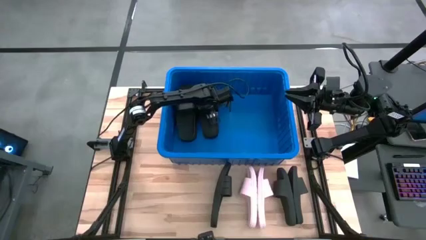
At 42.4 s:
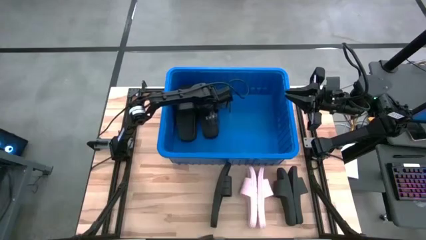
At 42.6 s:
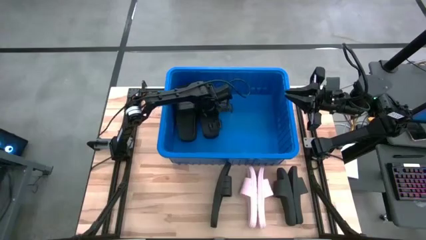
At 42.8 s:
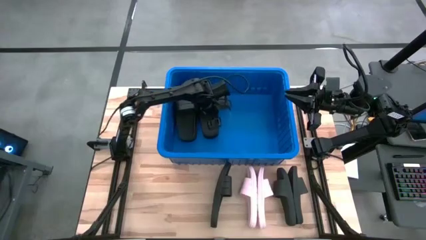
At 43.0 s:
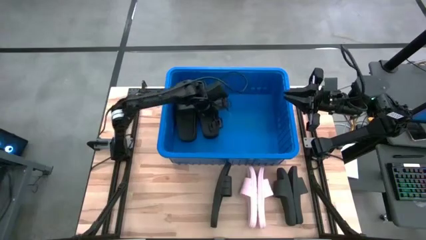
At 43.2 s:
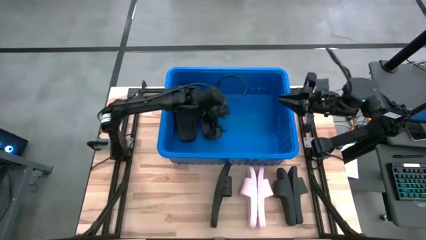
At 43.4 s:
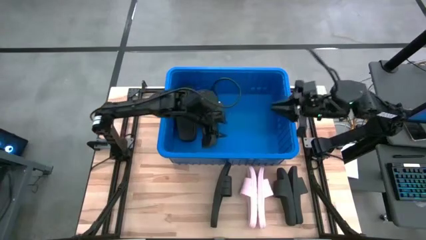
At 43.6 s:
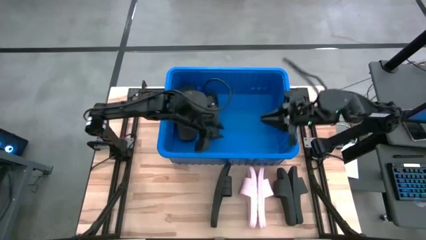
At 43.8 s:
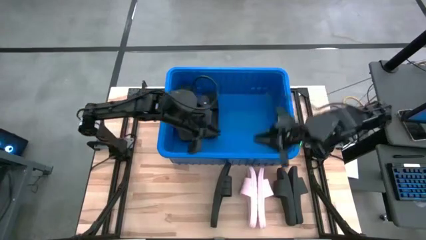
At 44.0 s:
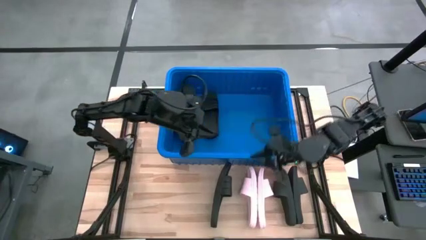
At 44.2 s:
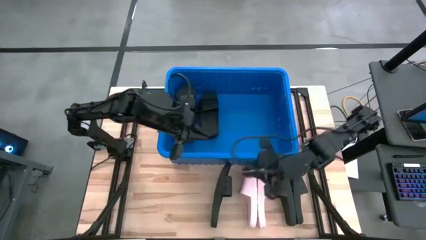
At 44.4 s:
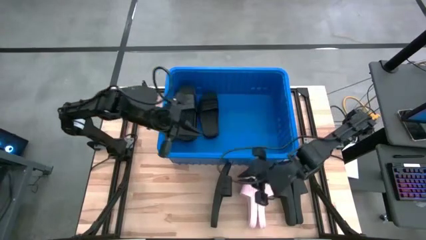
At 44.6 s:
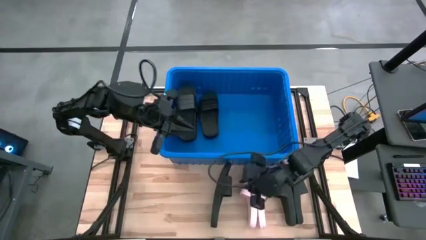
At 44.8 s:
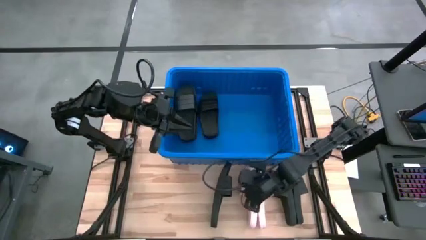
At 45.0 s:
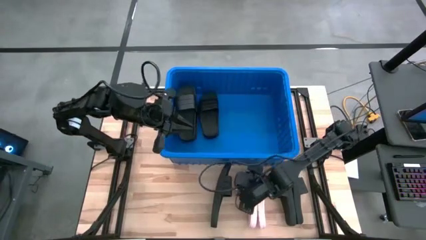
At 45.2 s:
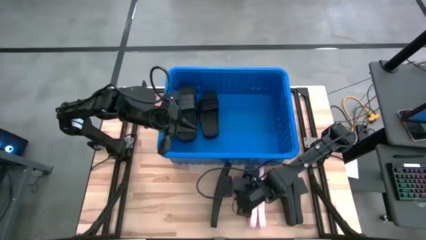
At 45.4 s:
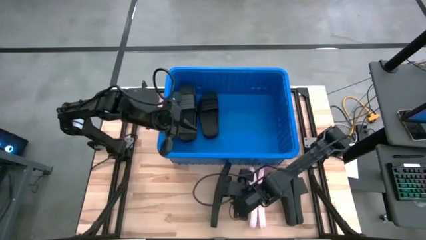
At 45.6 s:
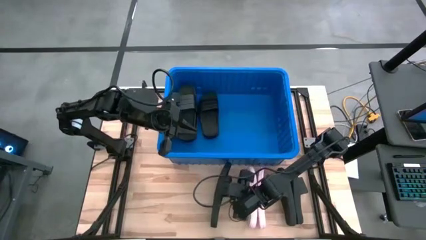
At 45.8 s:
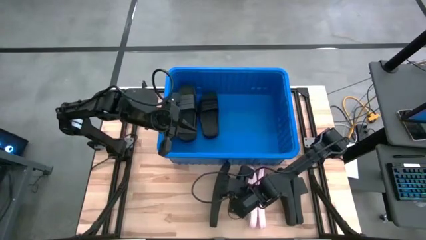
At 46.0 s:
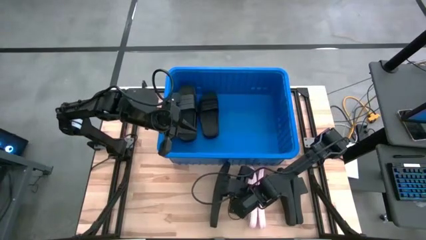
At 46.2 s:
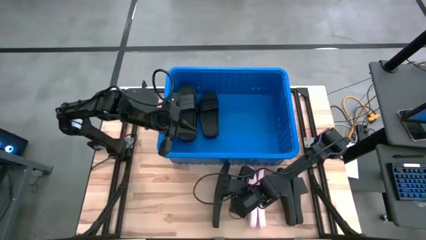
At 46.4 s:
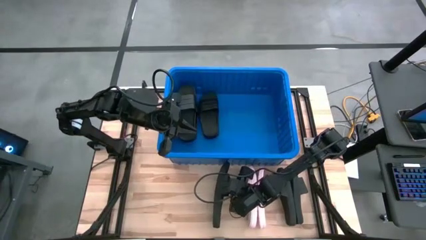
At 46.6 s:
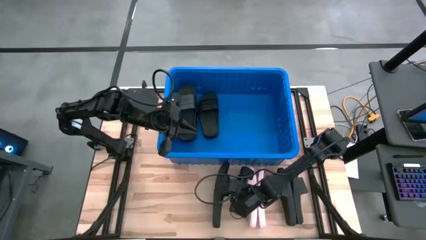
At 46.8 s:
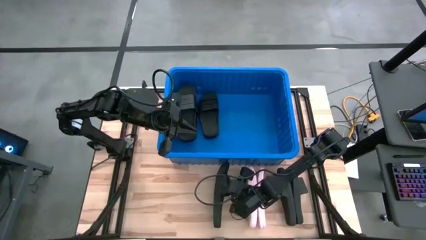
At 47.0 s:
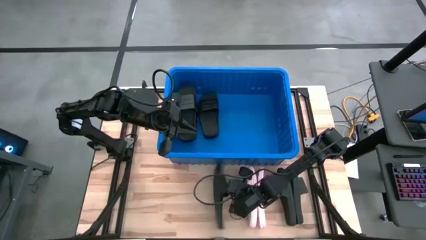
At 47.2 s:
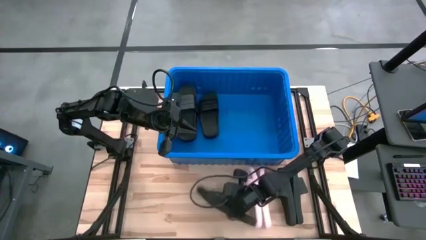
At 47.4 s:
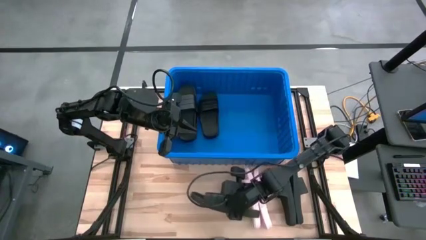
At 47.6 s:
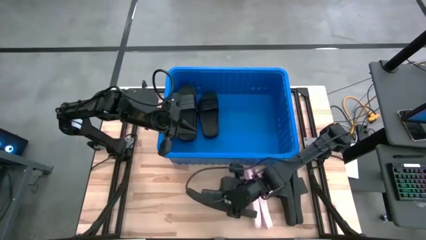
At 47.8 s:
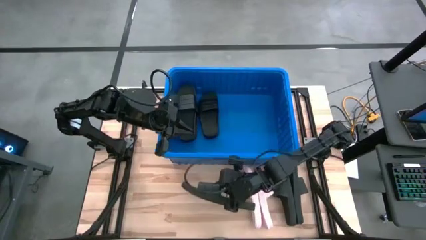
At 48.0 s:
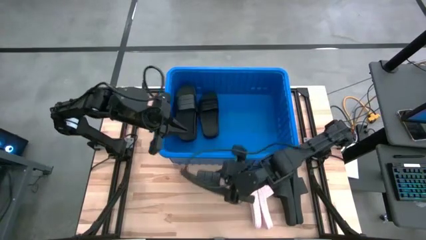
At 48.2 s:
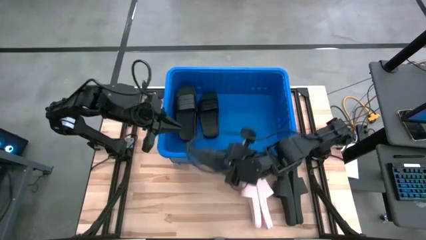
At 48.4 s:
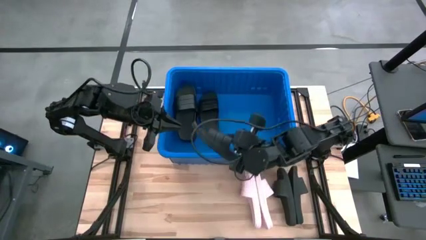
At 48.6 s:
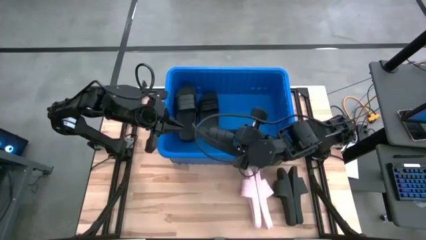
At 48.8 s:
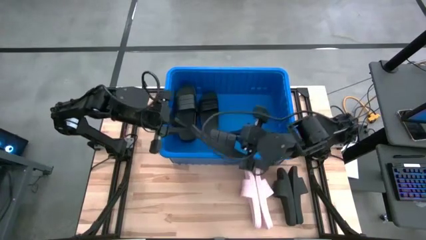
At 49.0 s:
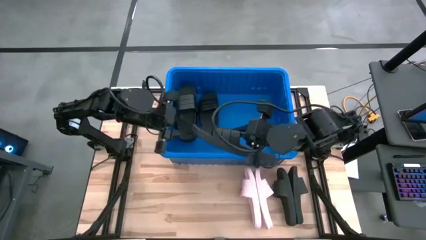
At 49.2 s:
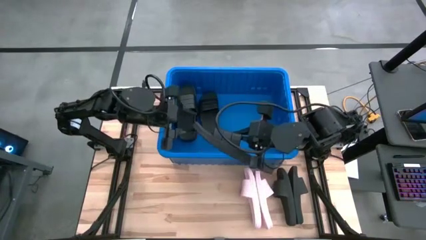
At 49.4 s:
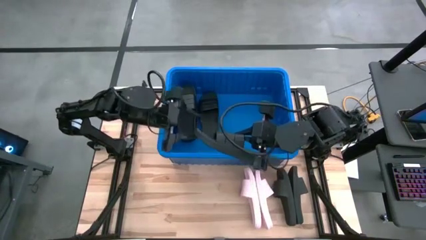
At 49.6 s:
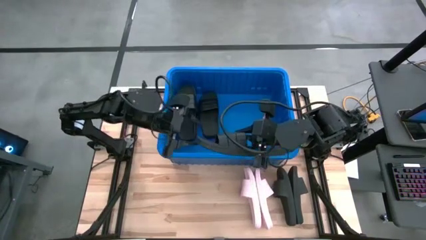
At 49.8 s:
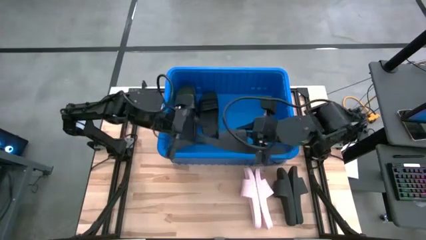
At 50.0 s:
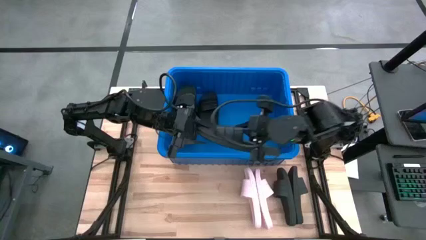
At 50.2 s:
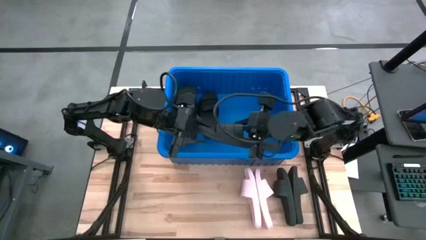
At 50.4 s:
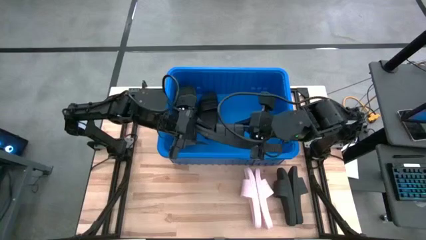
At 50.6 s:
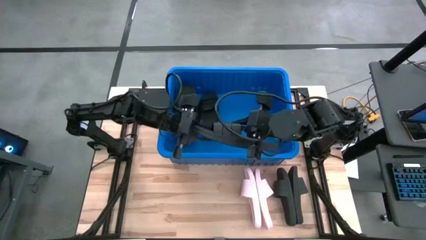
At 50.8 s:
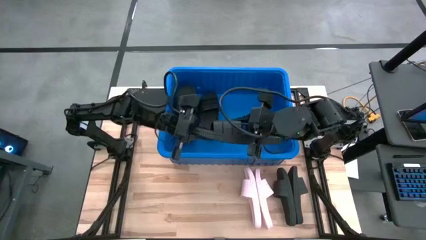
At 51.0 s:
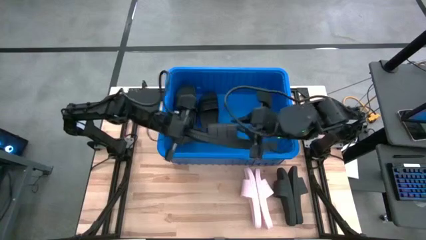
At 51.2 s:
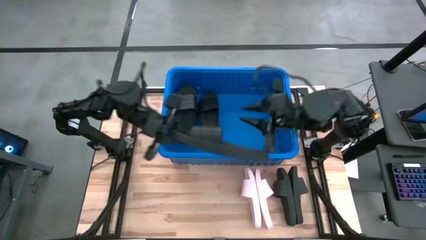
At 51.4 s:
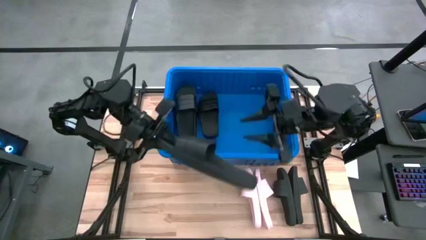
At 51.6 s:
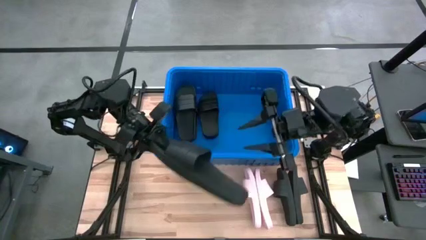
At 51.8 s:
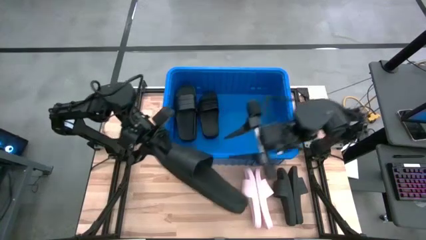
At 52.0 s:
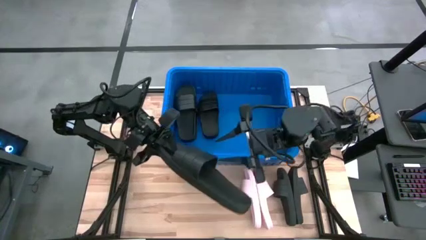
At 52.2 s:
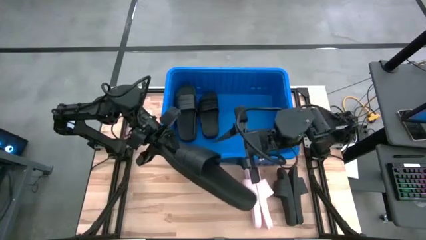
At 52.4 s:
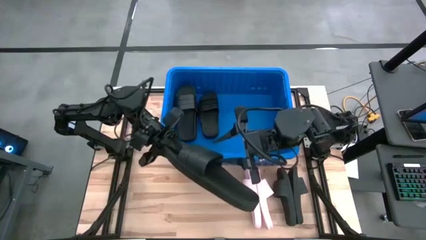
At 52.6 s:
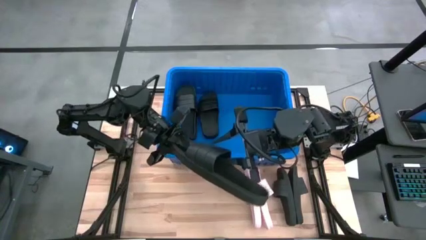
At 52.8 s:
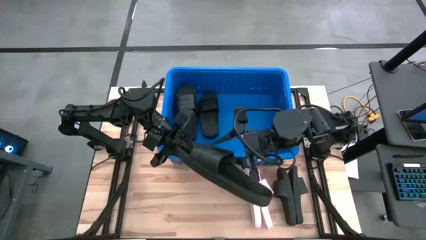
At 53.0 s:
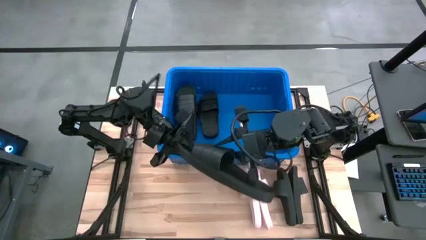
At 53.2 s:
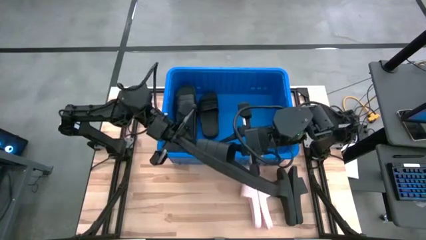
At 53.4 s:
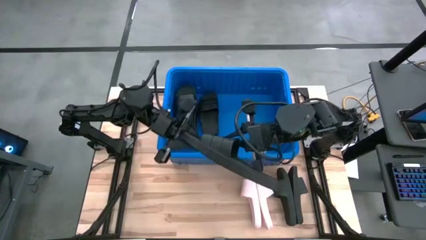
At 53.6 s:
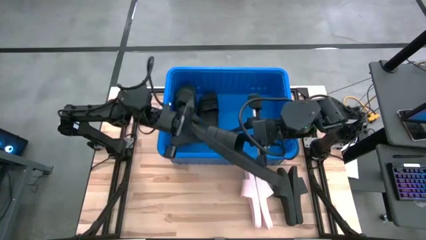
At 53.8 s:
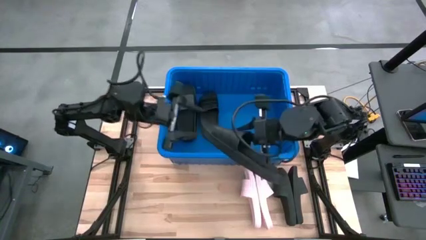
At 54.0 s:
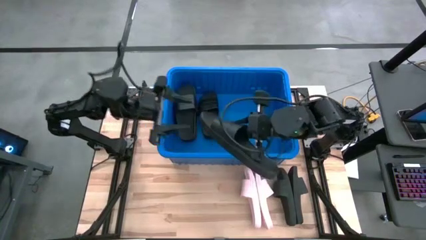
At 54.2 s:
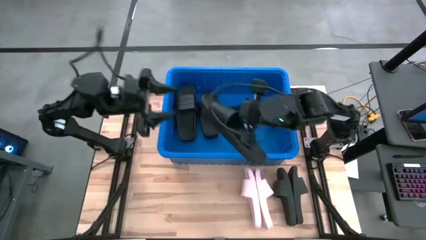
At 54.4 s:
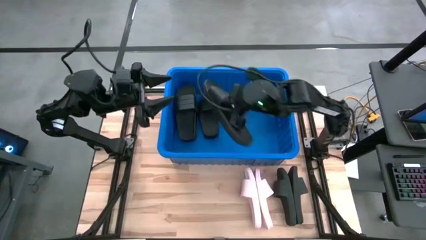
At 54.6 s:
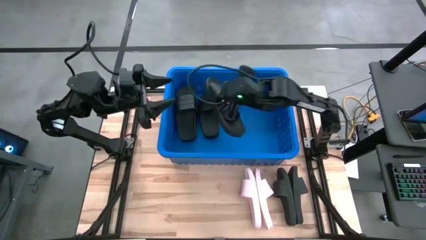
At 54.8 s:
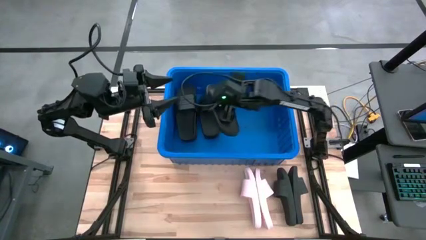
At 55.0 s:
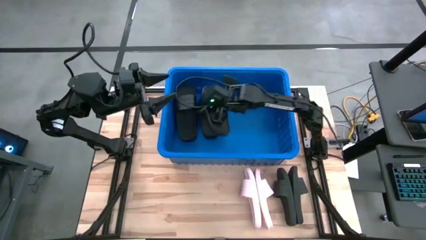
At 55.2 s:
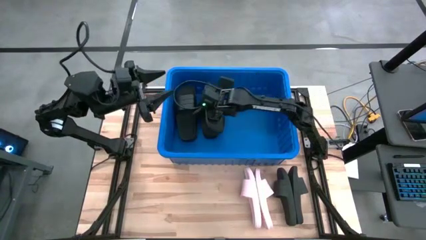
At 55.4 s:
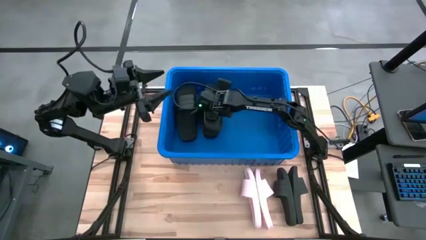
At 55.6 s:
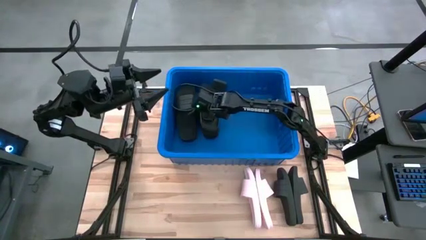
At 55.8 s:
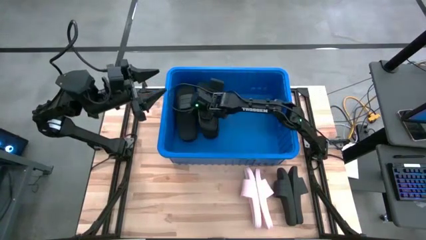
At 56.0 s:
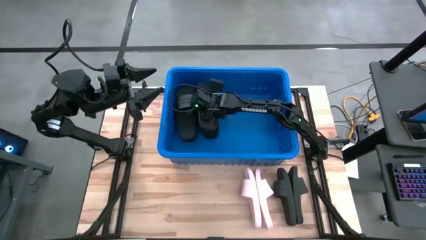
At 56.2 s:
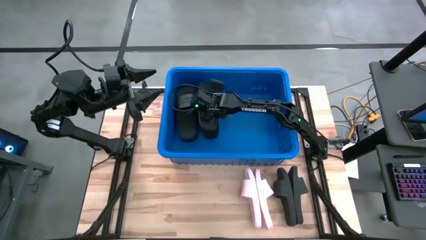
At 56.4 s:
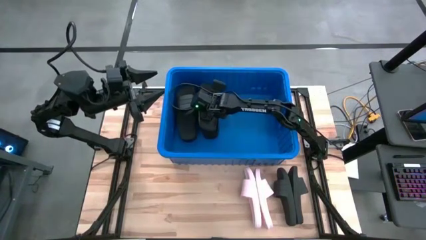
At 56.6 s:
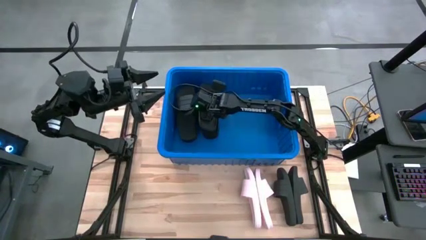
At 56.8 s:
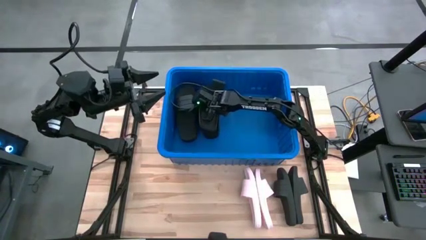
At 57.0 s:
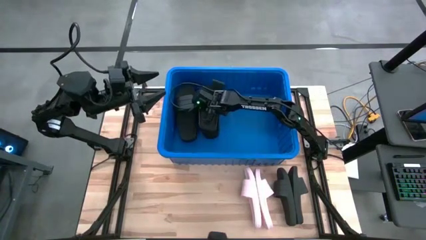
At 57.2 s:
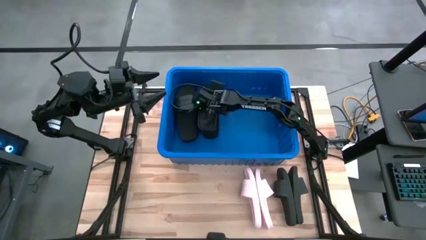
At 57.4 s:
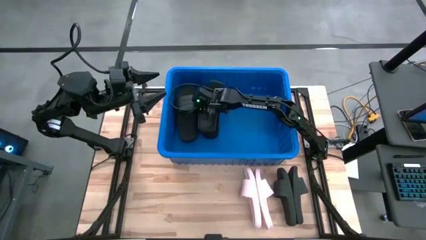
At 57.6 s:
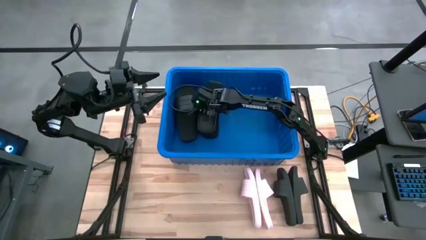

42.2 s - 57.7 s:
Task: Pick and place slides into bin
Put the black slide into the blue bin
